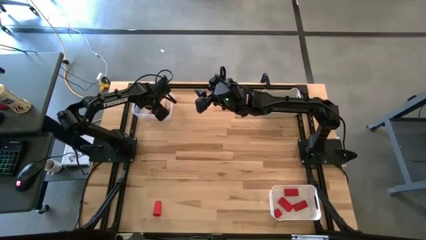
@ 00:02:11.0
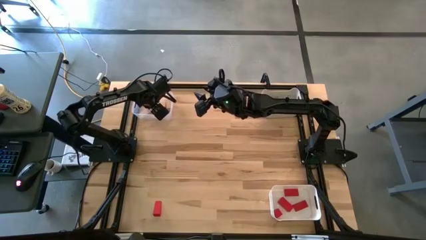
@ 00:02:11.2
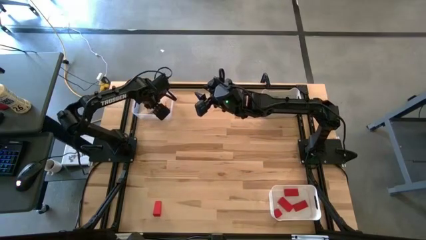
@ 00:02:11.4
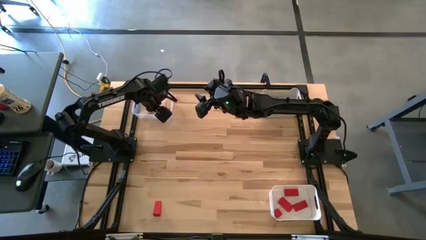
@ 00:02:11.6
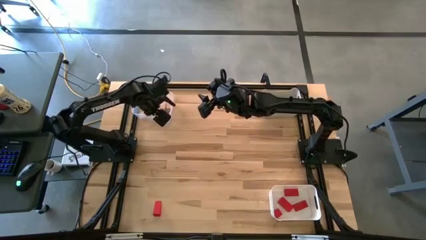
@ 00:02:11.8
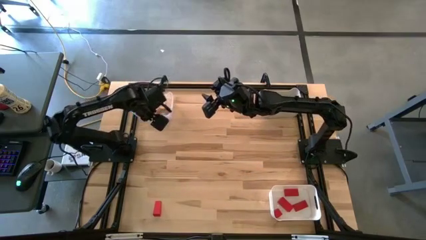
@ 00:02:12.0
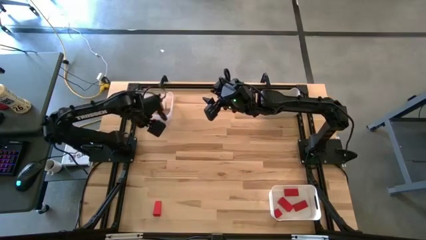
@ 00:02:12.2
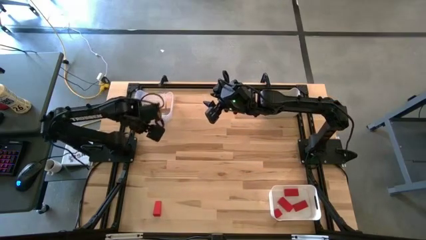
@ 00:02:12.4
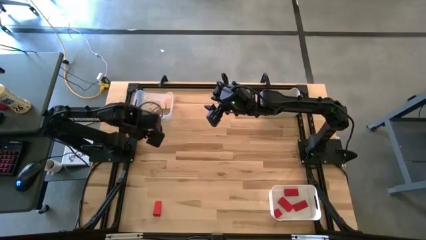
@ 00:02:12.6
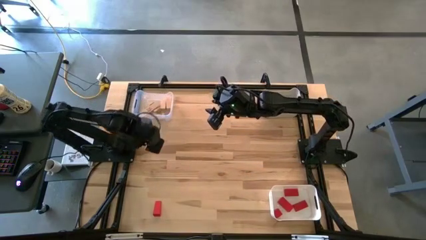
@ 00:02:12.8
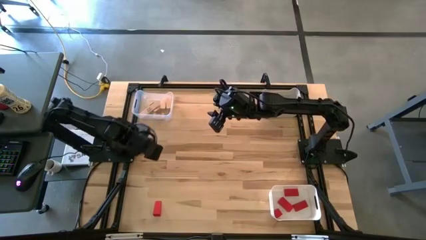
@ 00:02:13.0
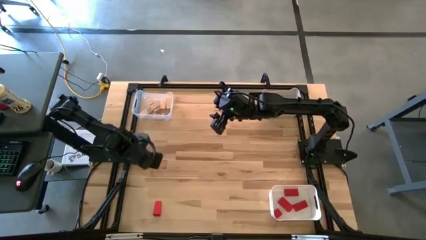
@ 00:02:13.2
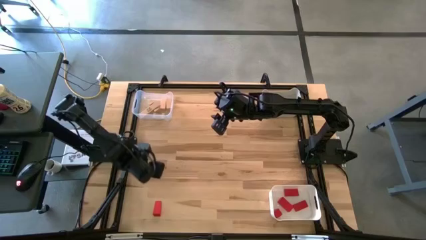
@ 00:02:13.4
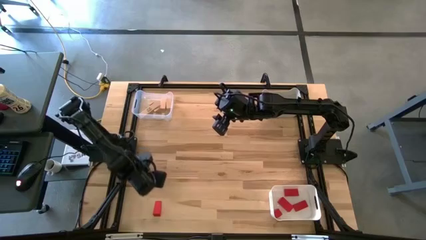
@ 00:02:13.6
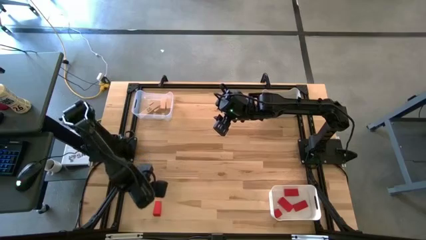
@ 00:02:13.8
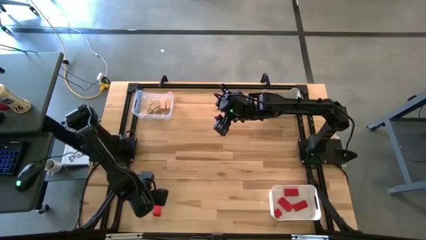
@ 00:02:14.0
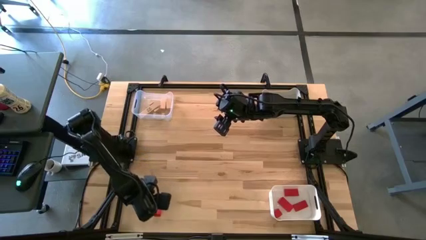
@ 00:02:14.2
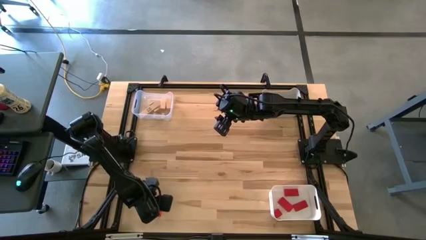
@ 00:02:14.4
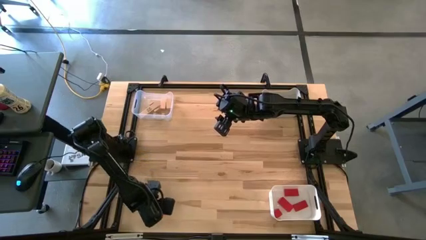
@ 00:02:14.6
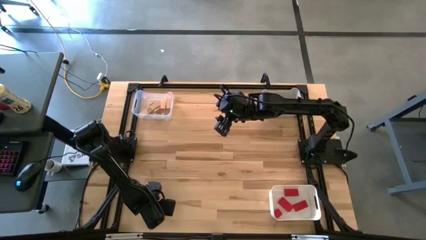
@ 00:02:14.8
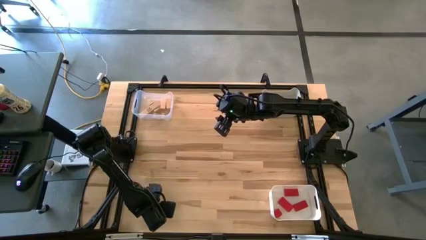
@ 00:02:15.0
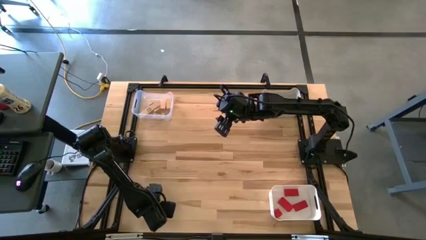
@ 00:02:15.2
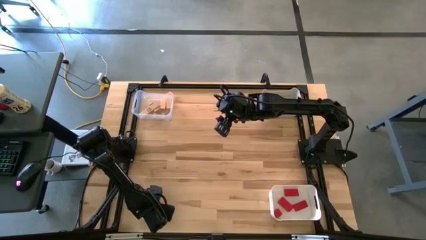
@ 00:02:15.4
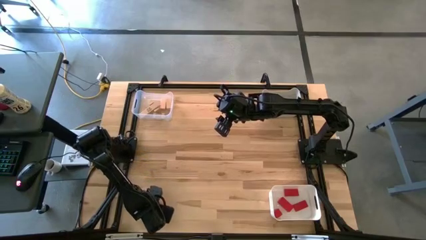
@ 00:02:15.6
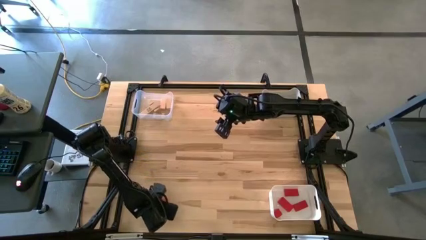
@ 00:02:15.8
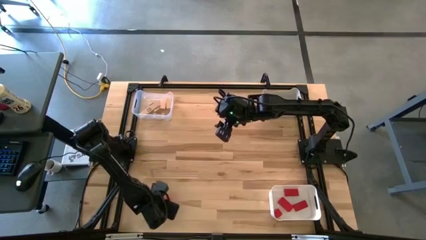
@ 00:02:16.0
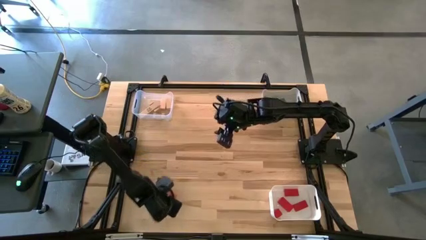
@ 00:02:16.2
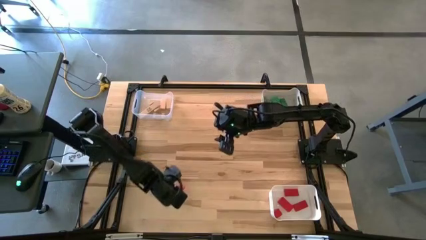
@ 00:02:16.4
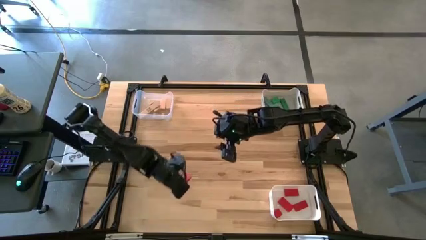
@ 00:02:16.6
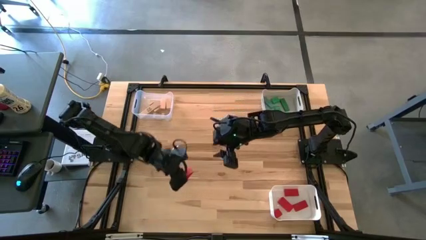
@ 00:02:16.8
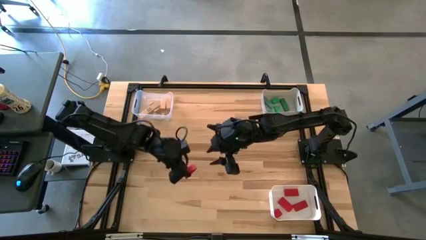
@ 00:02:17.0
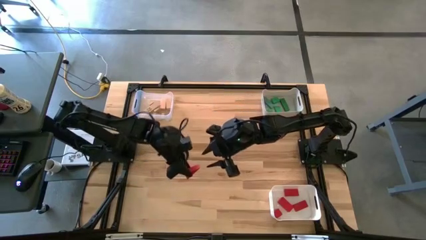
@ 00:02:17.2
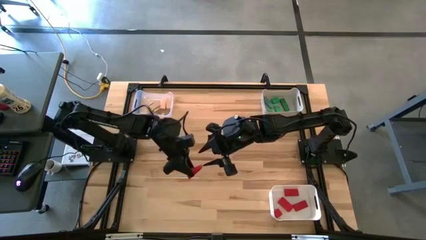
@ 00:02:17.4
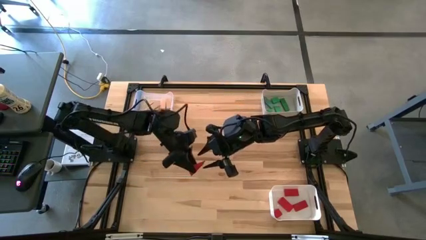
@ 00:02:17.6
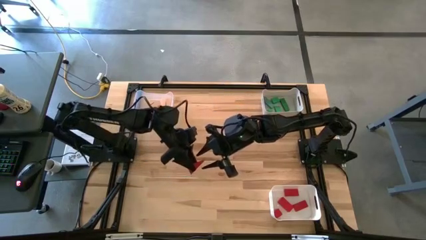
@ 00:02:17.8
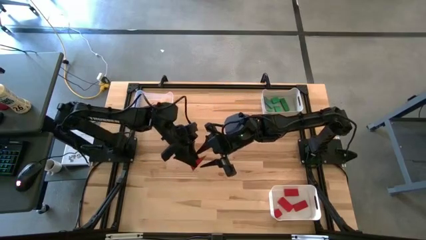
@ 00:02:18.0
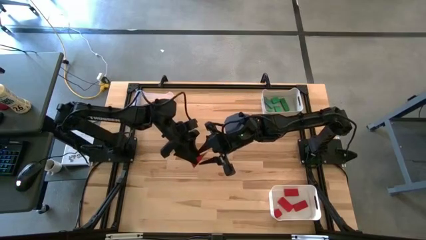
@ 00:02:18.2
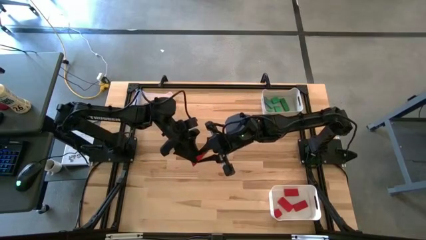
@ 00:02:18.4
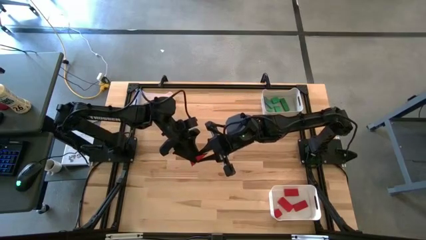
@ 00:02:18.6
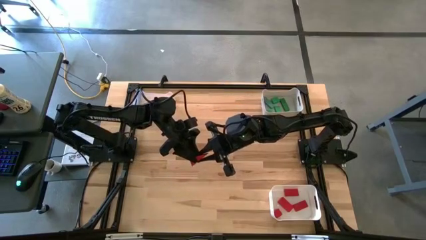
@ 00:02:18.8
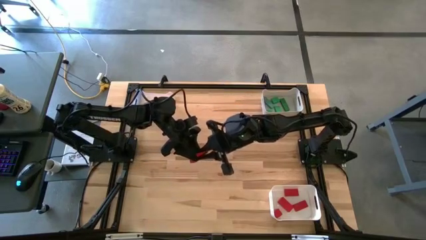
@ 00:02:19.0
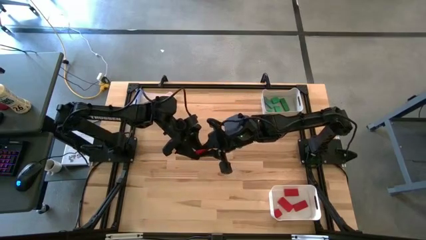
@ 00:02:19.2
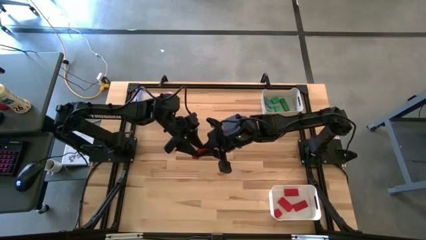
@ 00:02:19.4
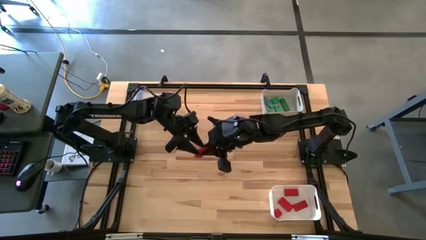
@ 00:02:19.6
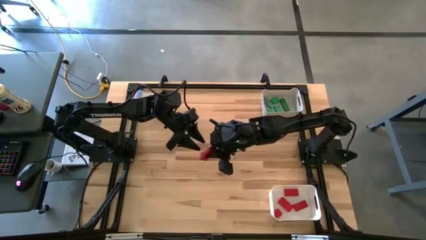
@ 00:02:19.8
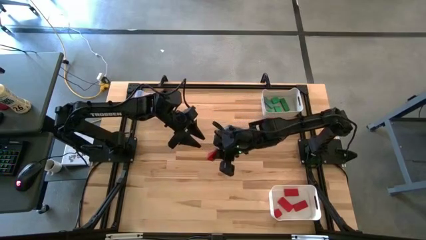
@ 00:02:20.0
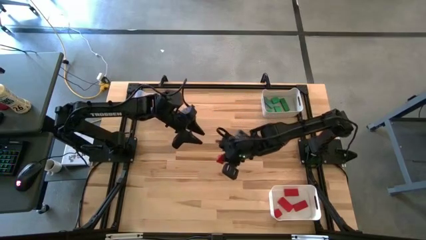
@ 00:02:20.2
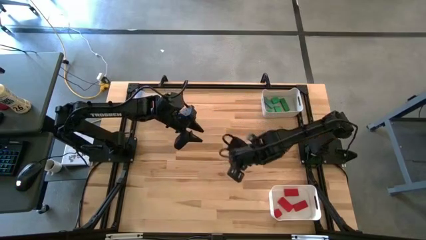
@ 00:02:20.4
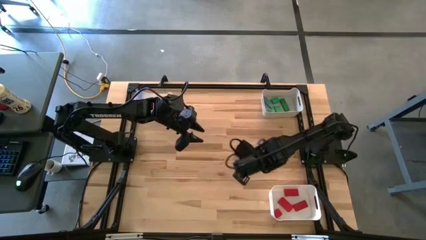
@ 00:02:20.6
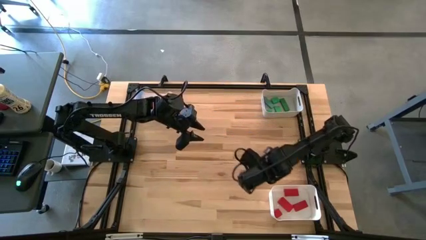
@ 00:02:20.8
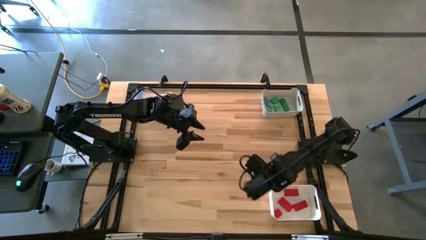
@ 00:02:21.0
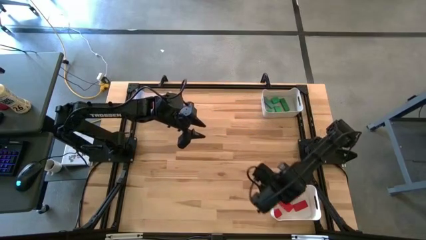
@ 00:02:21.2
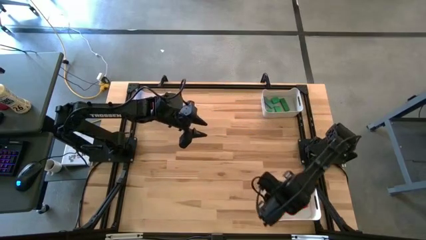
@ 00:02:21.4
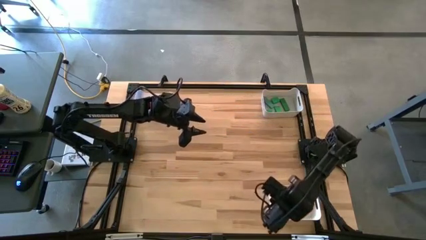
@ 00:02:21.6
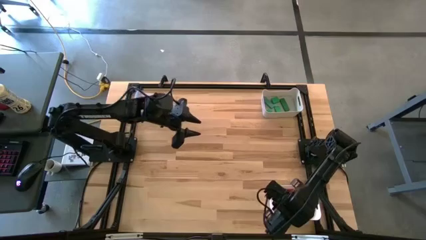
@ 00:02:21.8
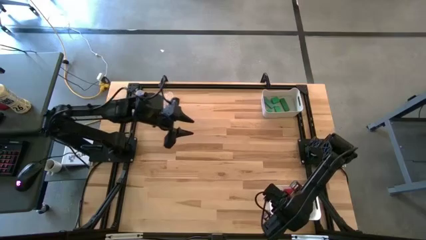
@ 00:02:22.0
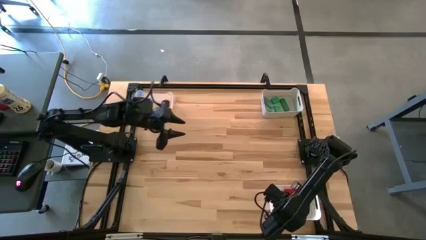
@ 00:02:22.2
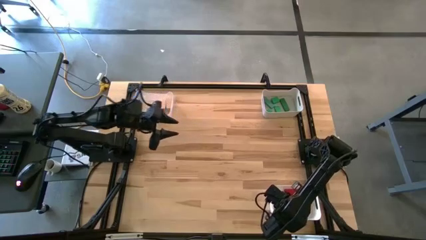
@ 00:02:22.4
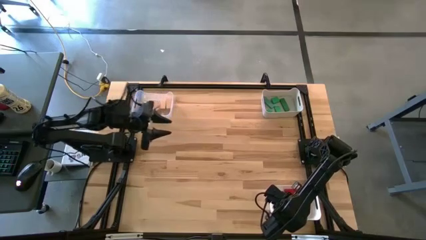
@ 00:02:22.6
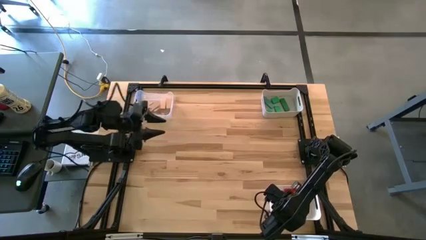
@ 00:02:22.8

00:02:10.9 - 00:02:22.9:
Task: Sort & place blocks by color
Put the red block into the white bin

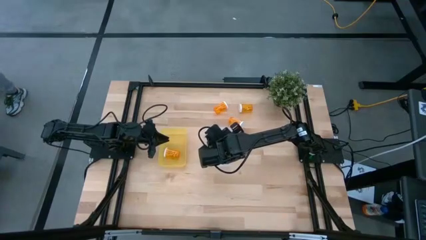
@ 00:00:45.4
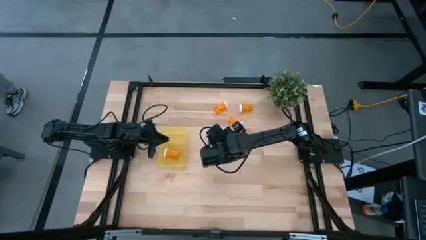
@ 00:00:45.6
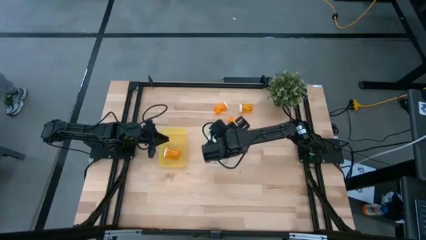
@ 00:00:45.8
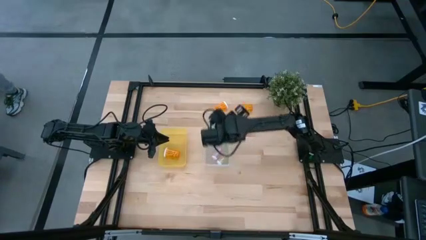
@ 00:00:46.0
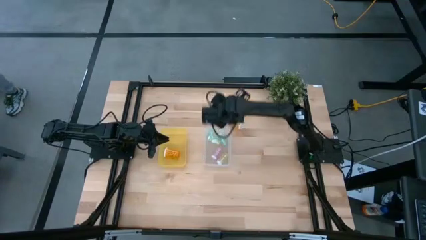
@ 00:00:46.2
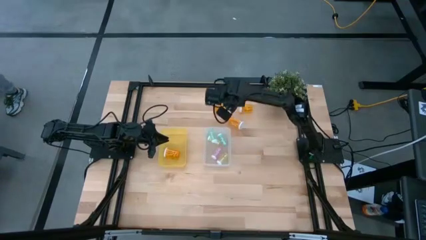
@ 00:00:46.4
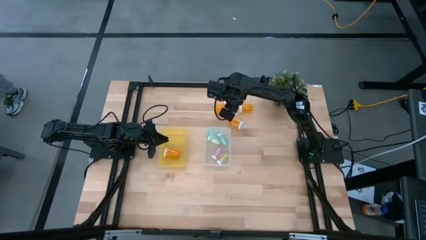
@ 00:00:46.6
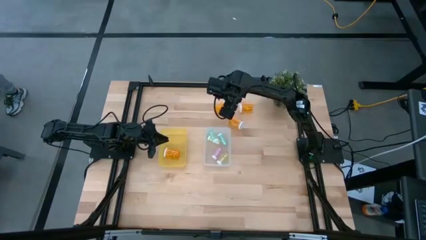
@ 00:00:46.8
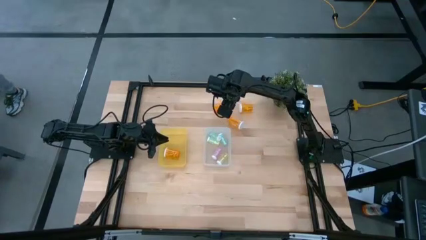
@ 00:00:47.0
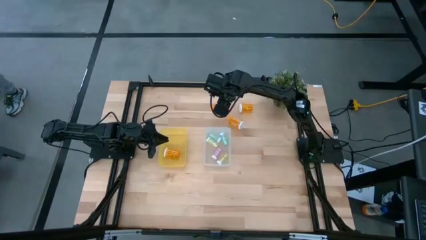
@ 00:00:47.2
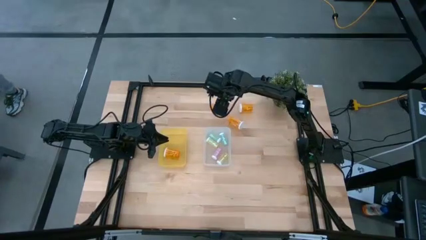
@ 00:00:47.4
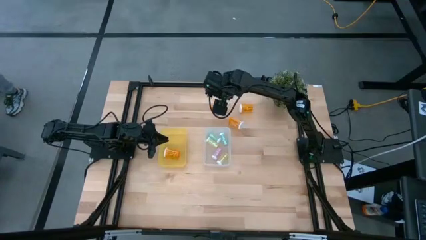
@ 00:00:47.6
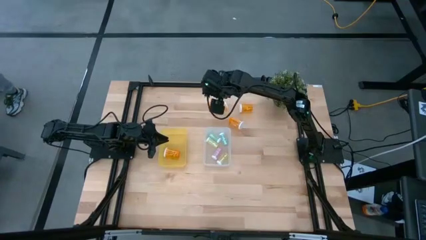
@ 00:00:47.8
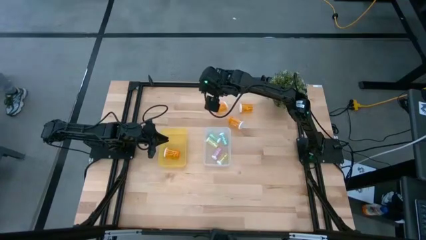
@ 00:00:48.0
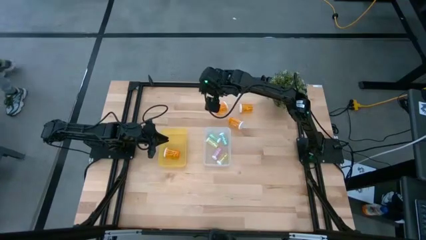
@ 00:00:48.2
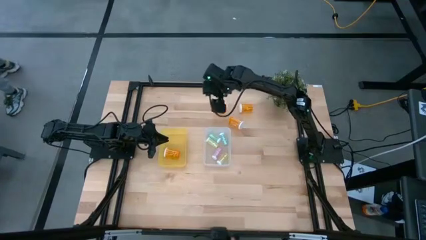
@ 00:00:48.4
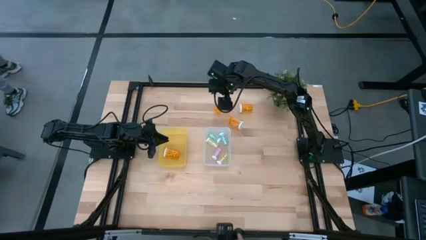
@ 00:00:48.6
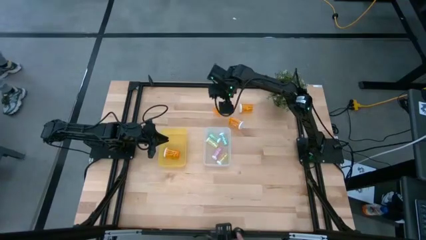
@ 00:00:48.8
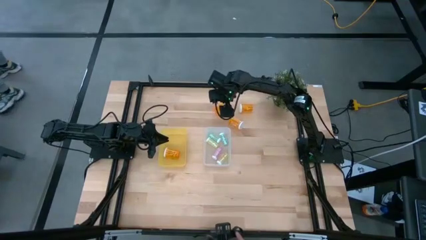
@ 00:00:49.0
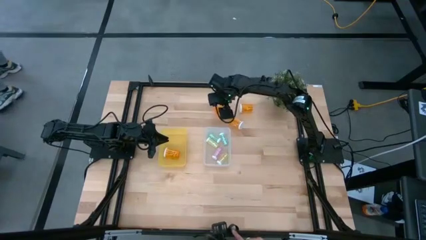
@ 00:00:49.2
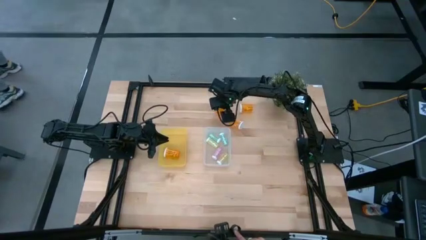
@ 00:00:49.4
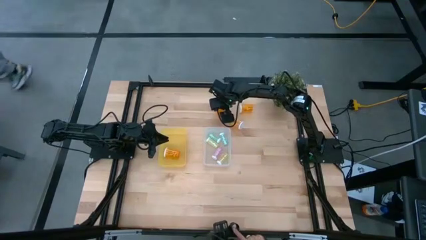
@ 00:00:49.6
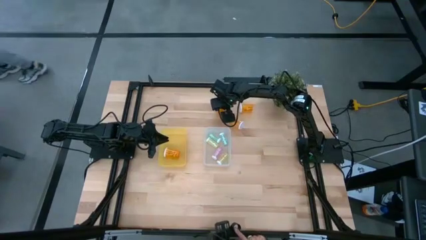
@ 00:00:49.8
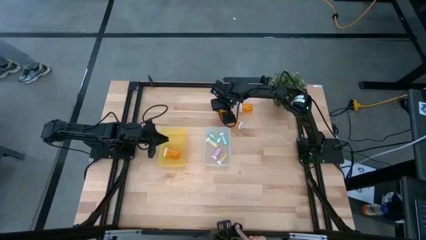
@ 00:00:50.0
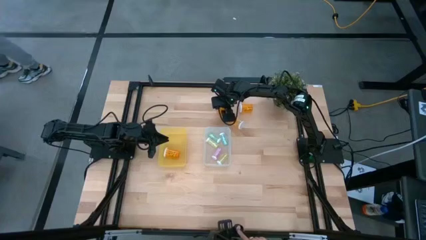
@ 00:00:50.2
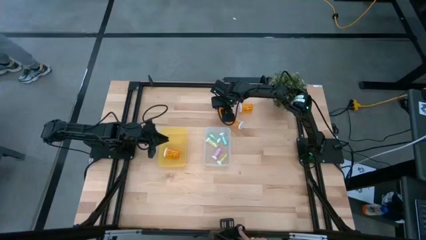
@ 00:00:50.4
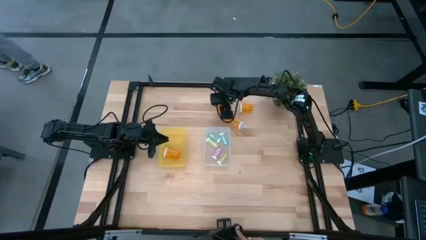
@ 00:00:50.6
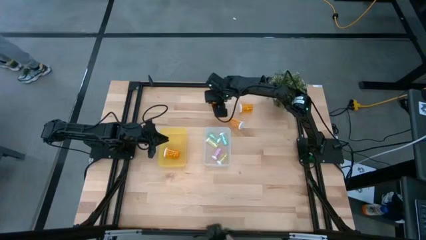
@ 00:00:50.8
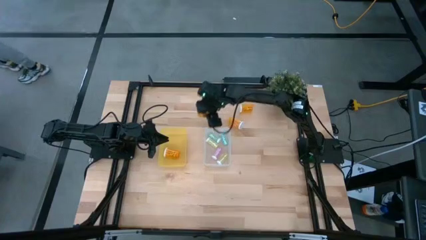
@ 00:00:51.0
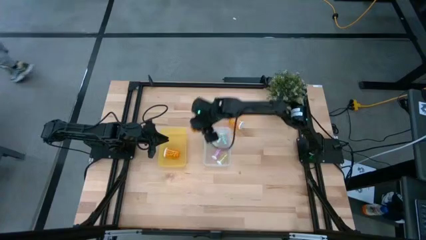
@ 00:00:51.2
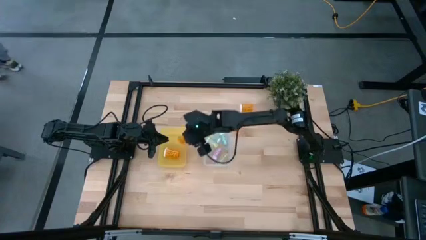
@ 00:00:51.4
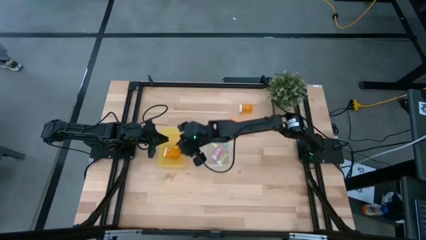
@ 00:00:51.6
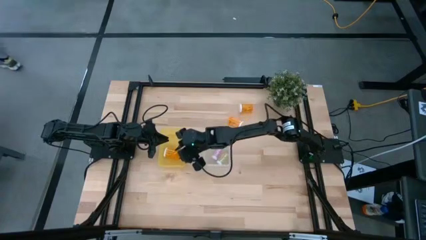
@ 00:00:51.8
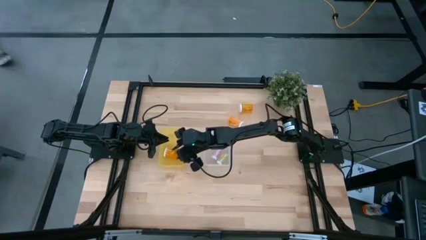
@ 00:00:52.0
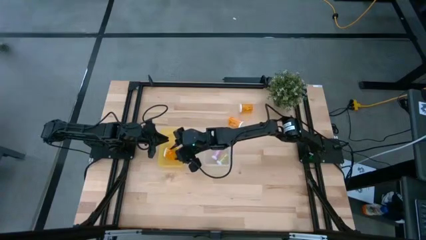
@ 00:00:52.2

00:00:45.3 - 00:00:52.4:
Task: Pick and place medicine bottles into bin by pill shape (circle, oval)
Put the orange pill bottle into the yellow bin
